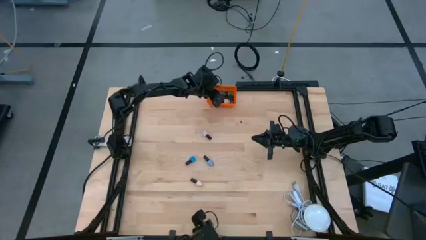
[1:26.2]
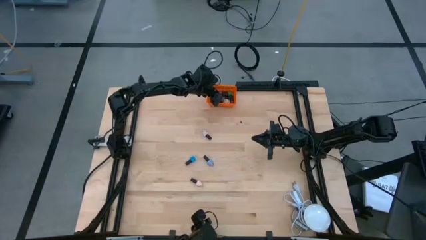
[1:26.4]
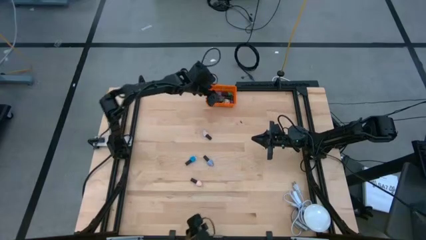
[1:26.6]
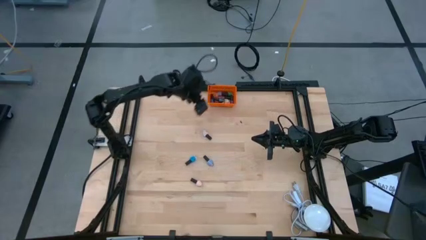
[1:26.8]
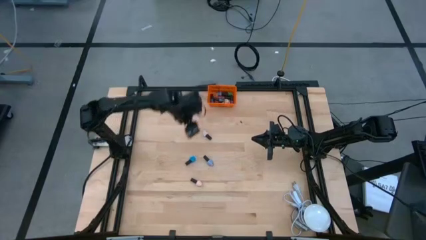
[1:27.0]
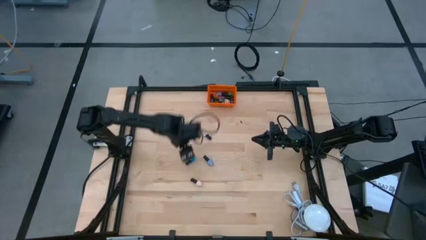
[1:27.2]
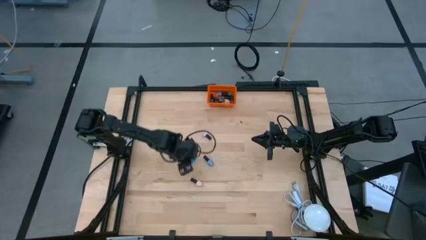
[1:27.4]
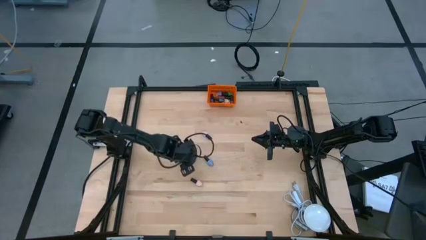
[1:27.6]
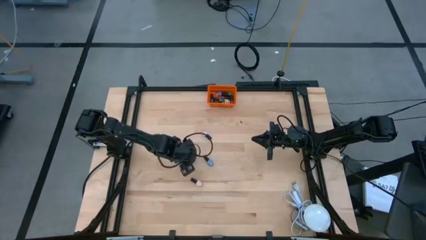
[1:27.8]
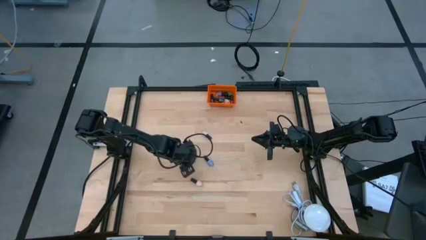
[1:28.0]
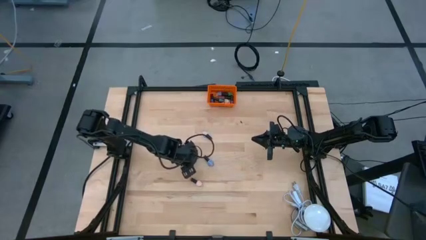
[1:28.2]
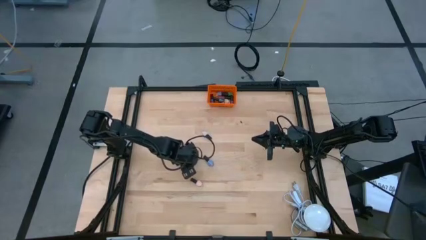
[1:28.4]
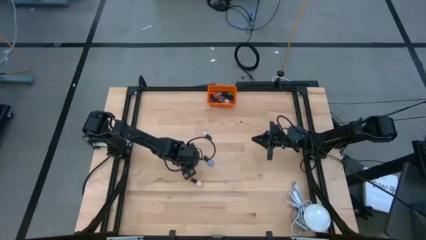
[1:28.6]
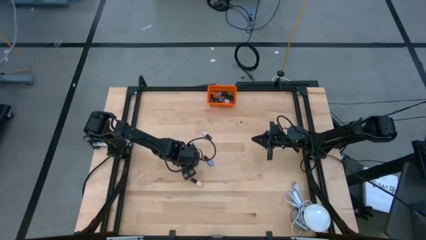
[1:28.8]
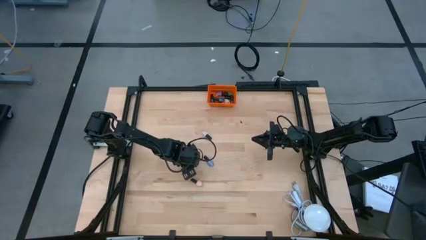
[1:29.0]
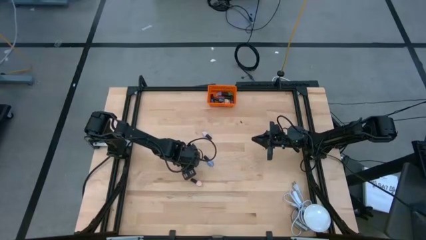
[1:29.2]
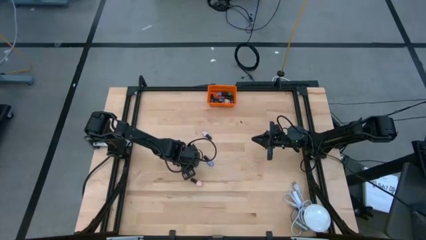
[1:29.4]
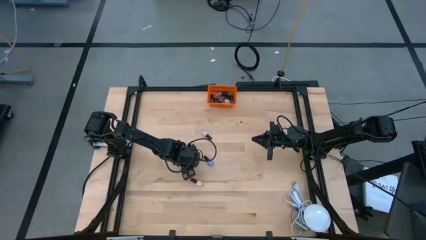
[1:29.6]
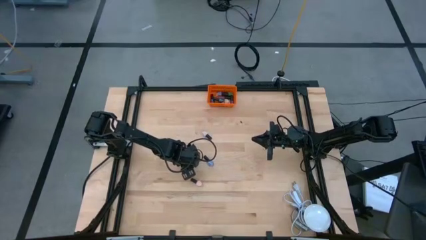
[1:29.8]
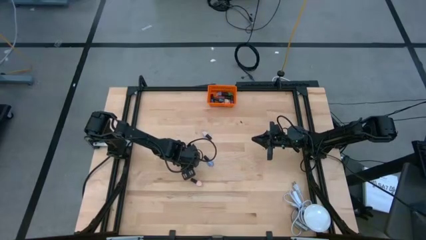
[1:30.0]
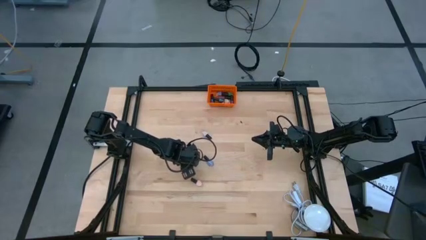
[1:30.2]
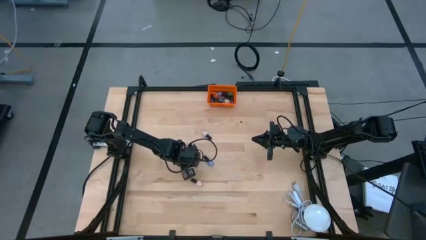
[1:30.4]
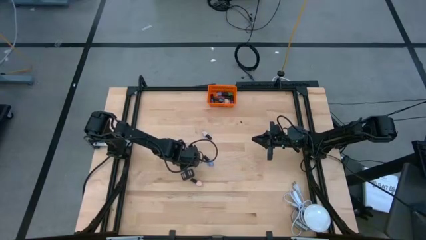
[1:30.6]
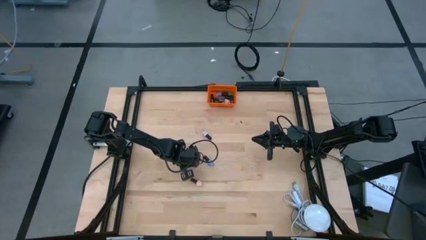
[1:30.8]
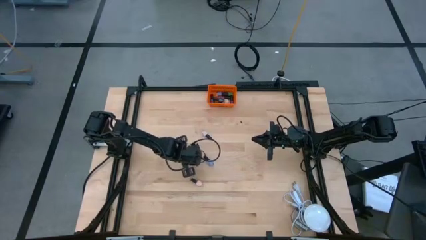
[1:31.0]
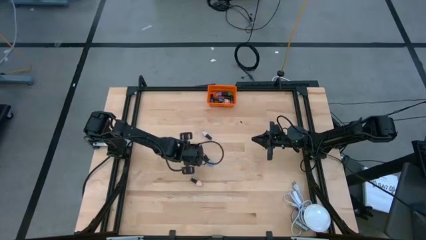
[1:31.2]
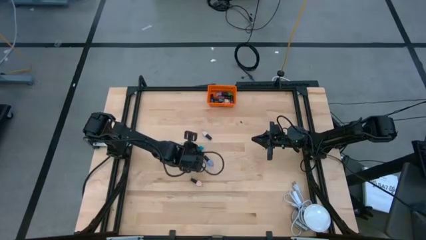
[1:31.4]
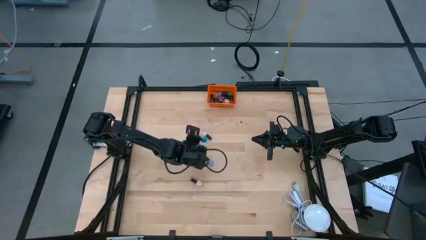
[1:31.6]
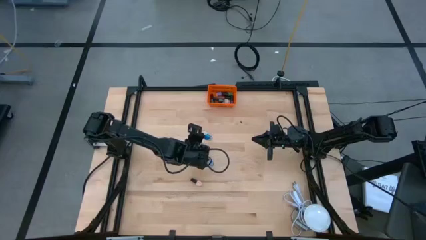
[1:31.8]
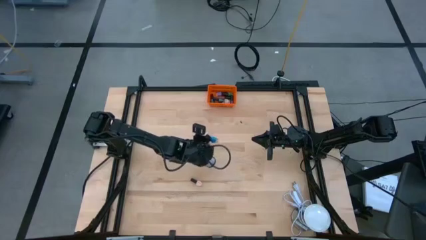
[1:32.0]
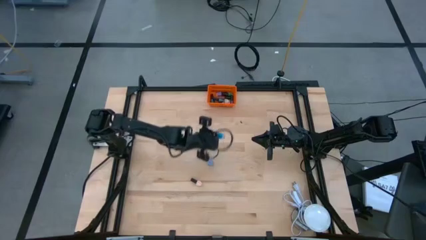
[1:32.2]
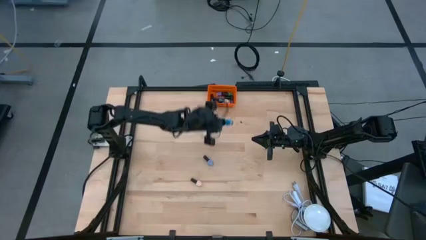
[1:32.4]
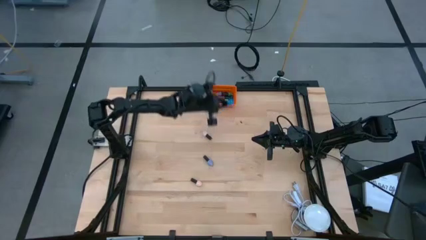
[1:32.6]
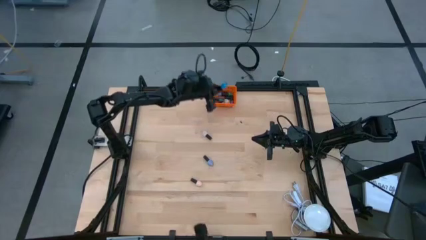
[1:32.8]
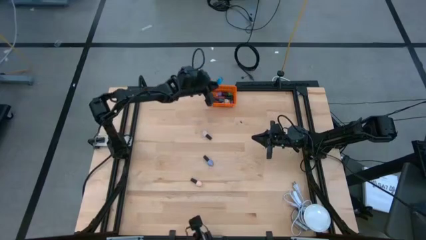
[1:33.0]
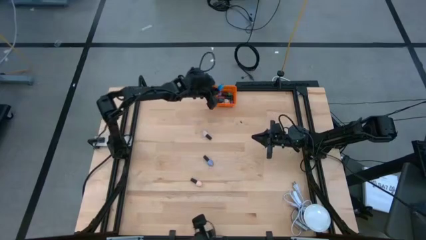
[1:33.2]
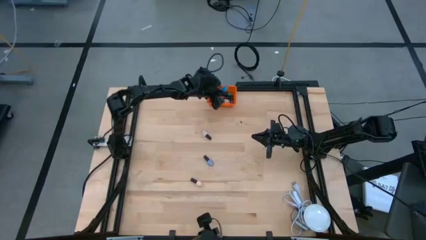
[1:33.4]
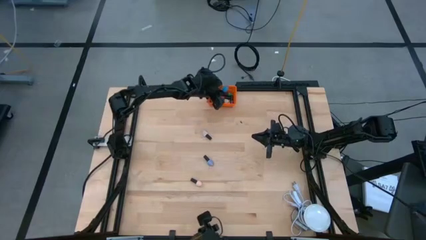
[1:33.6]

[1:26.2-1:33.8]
Task: Pick & Place Nail Polish
Put the blue nail polish bottle into the basket

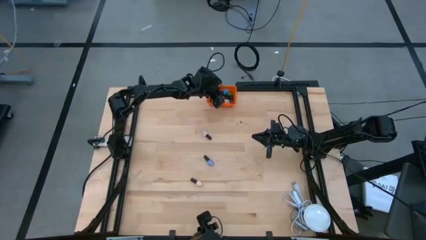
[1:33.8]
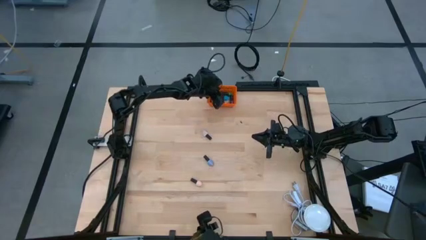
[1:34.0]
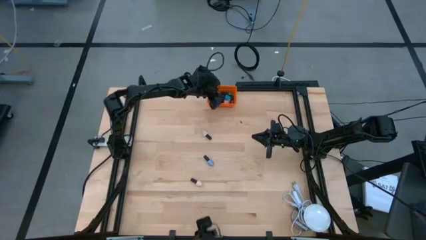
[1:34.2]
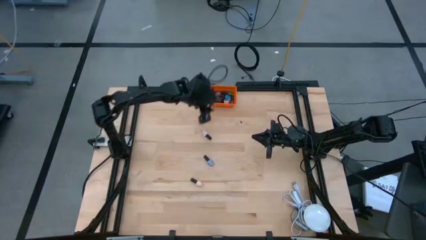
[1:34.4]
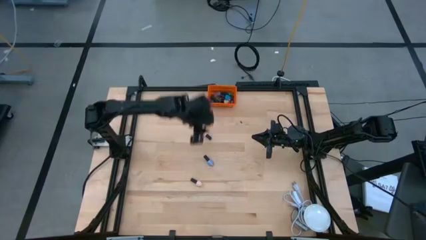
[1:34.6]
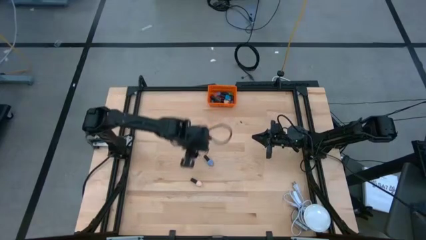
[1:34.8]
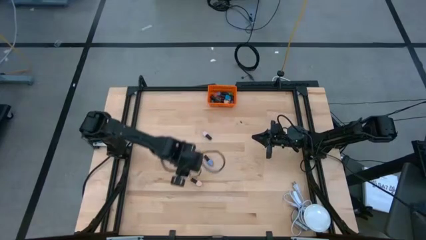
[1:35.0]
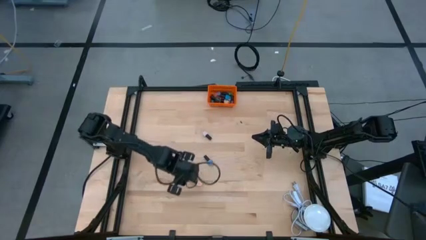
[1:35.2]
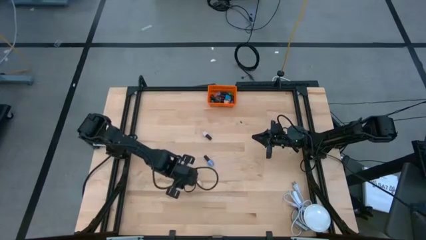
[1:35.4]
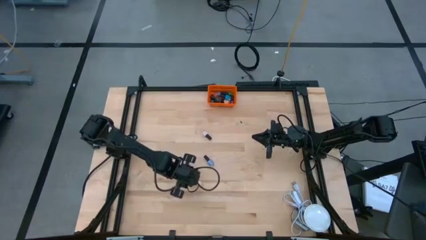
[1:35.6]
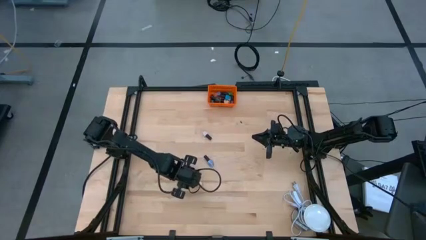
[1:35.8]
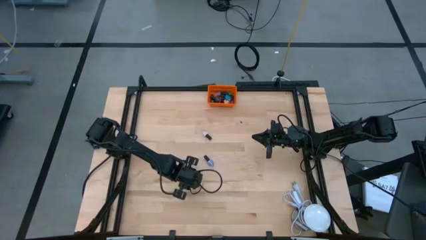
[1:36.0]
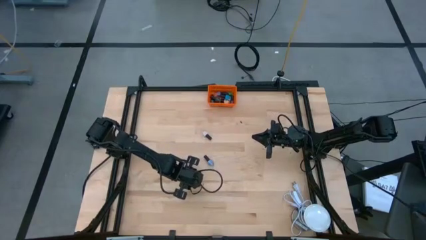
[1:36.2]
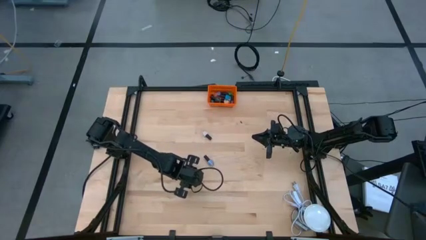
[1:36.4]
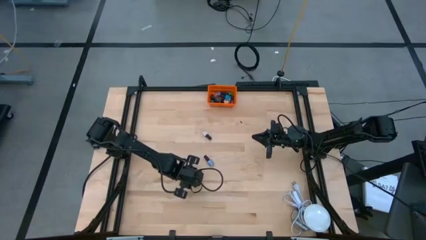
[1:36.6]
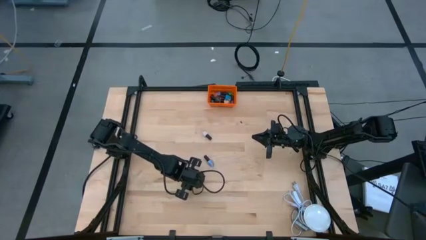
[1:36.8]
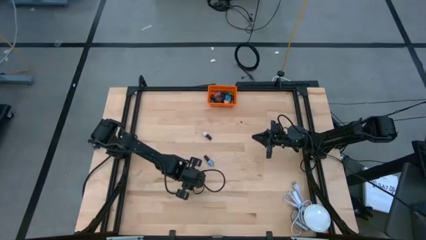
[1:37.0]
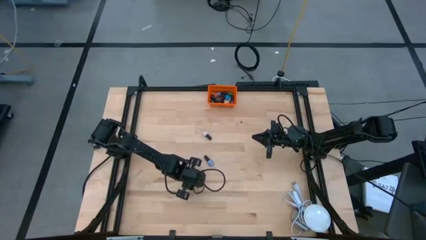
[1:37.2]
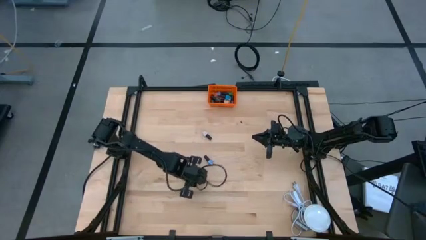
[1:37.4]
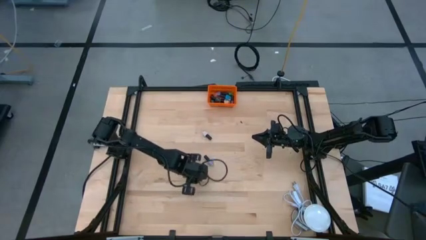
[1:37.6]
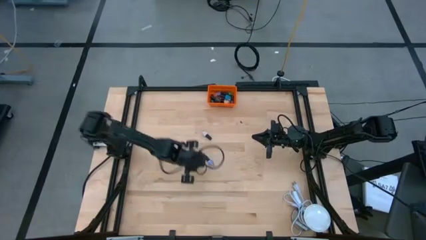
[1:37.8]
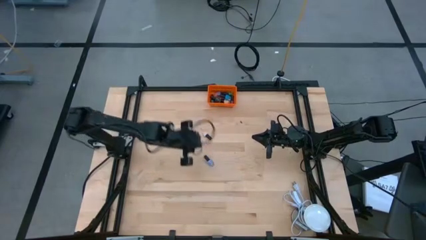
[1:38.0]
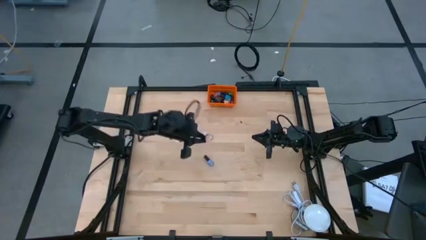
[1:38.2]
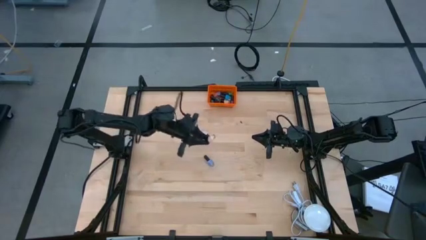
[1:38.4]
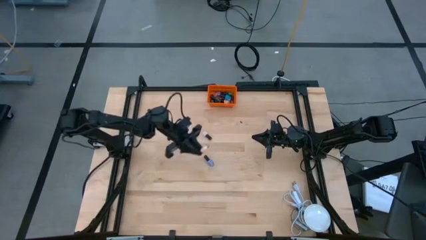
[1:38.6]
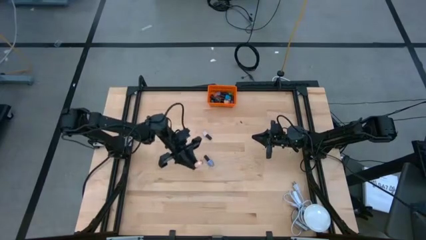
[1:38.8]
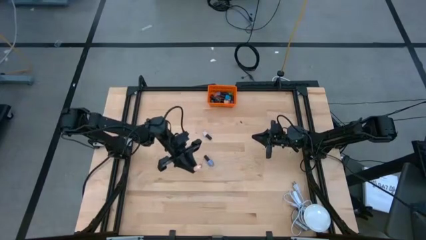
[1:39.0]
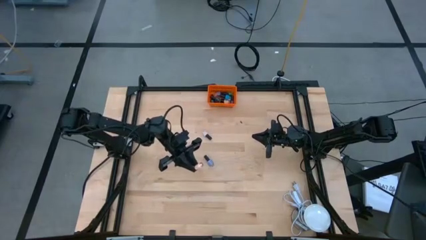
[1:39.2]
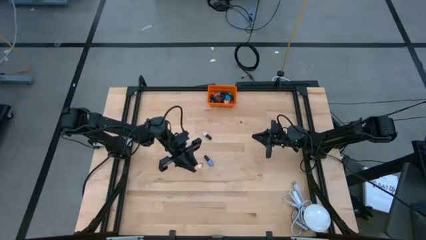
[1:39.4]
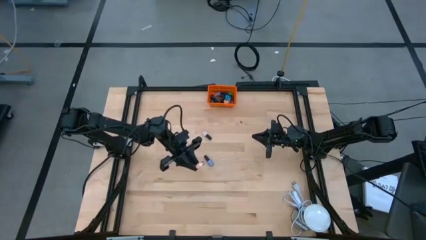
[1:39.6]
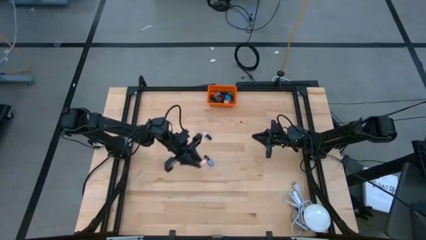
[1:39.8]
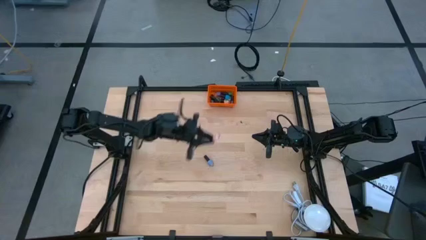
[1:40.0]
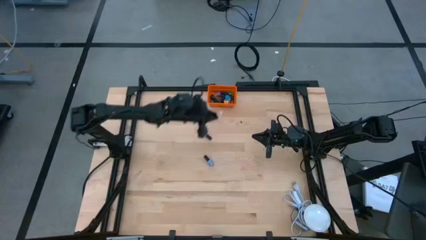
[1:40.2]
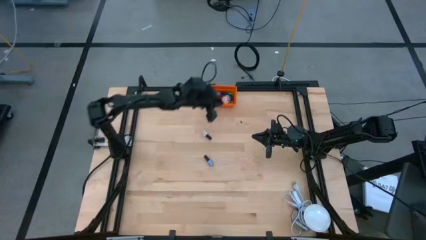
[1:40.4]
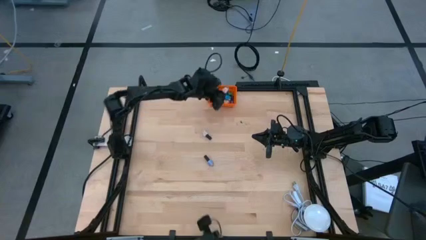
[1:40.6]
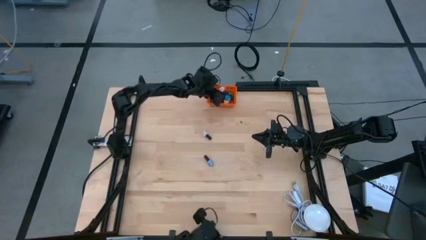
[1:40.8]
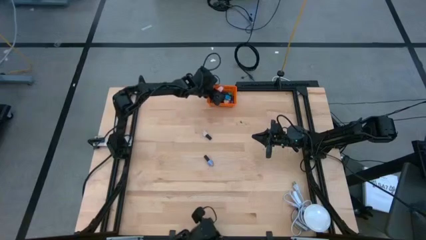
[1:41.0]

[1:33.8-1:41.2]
Put the light pink nail polish bottle into the basket
